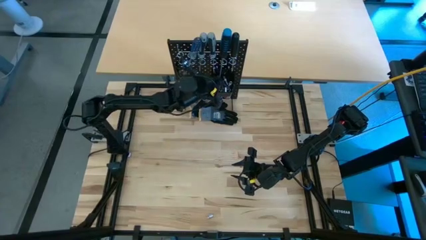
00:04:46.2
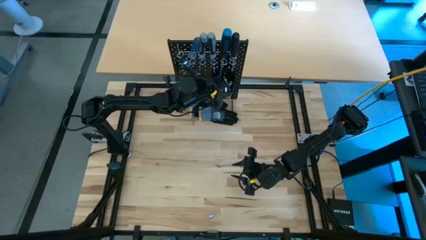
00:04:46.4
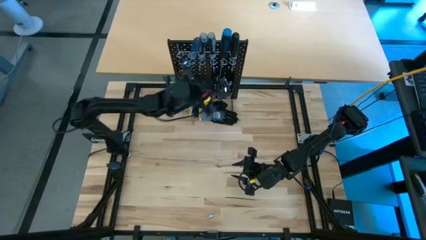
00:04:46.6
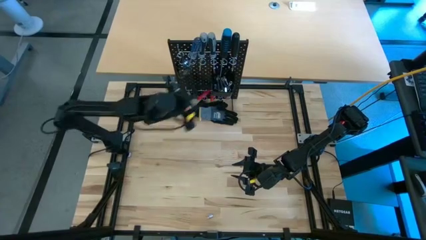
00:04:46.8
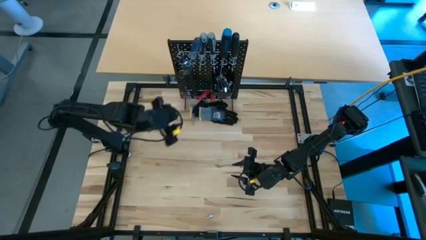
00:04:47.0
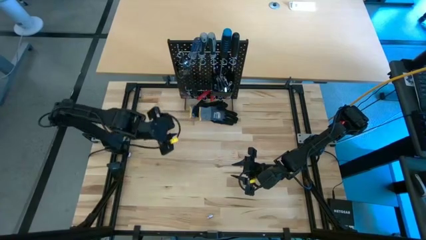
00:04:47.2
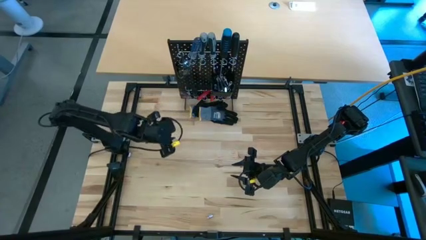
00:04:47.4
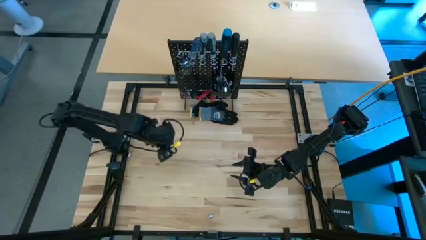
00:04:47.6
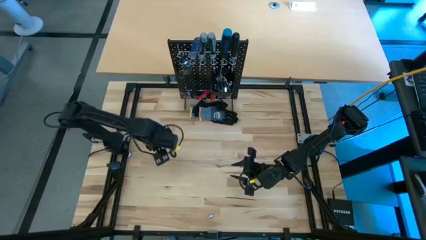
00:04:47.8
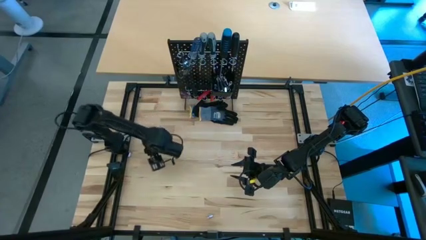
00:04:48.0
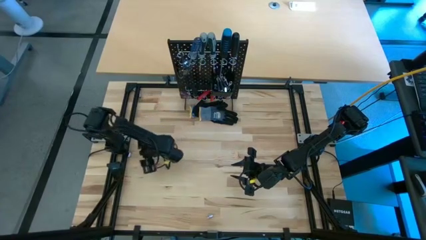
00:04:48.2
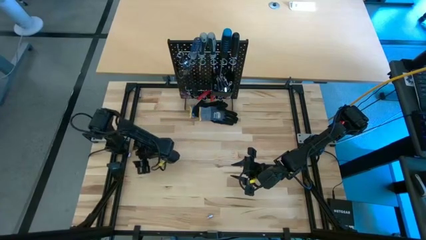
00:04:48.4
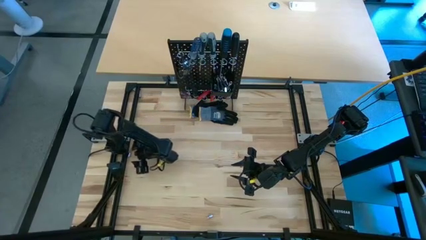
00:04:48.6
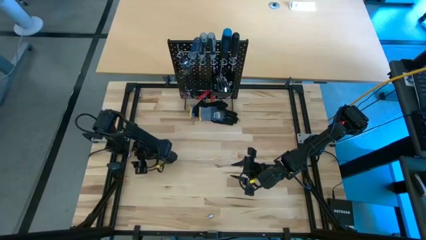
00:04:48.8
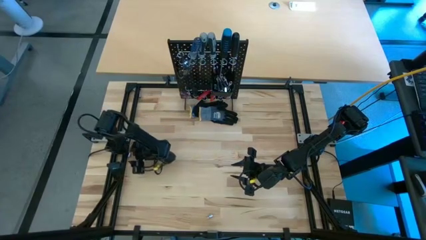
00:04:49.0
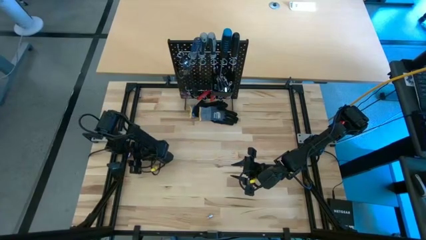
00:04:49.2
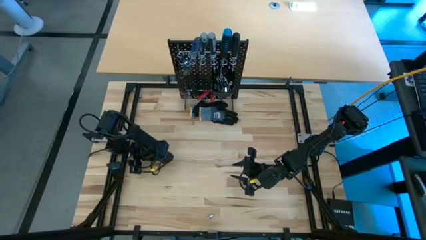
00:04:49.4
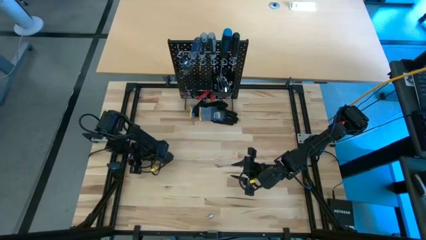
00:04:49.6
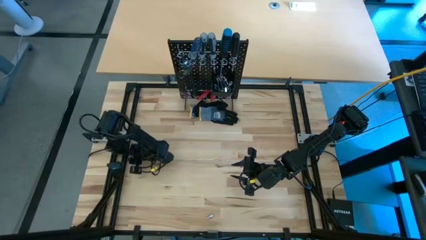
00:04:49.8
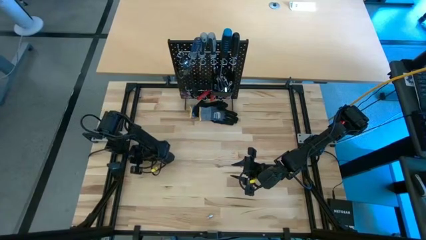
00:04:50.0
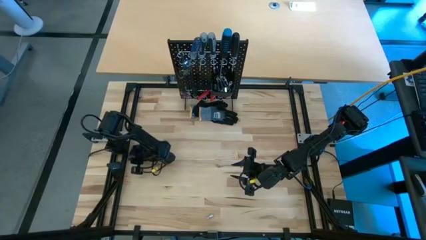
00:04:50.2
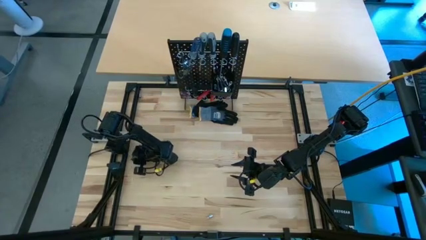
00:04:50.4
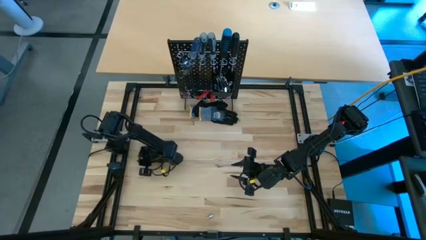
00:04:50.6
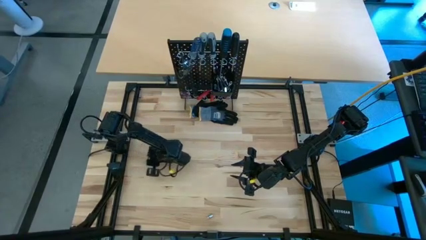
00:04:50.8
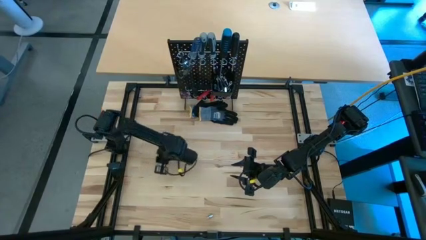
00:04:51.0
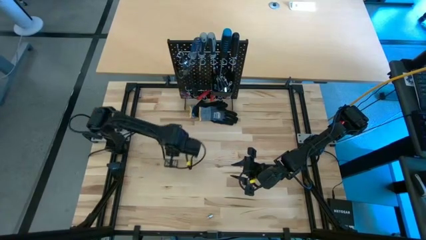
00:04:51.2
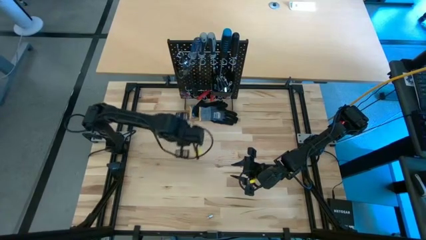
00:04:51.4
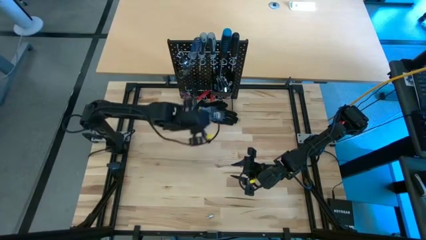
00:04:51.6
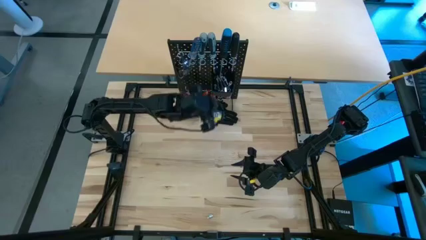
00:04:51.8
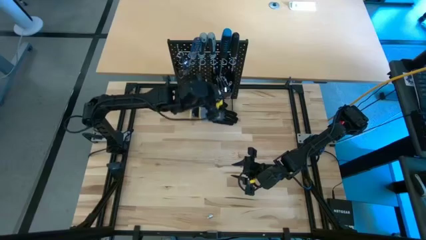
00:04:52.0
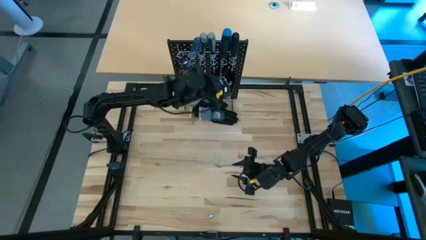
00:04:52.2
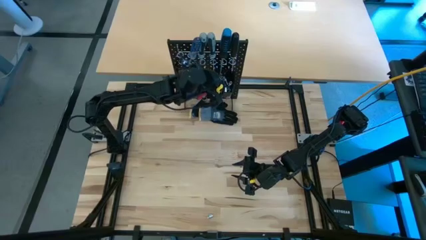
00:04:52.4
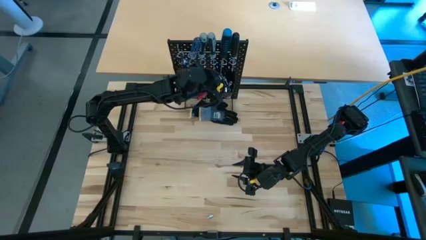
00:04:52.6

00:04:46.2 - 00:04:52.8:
Task: Hang tools onto peg board
Put the socket into the pegboard bin

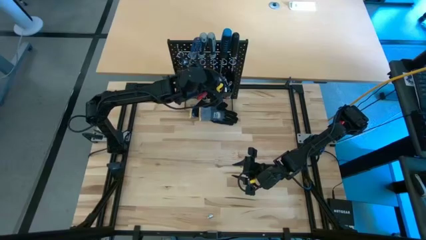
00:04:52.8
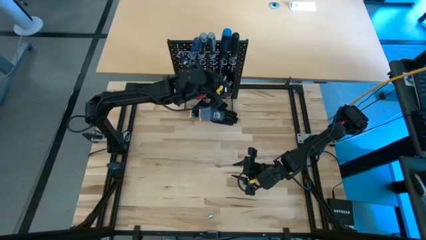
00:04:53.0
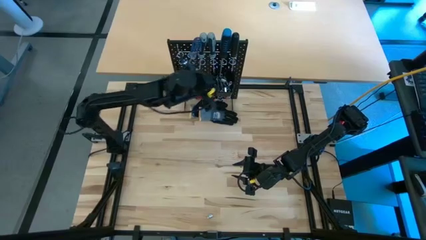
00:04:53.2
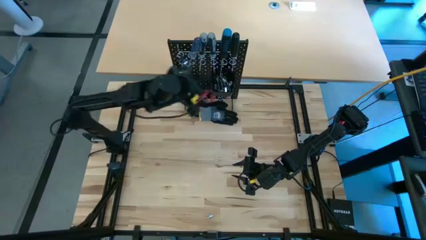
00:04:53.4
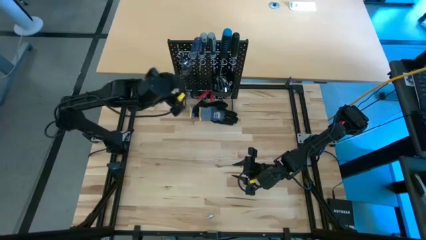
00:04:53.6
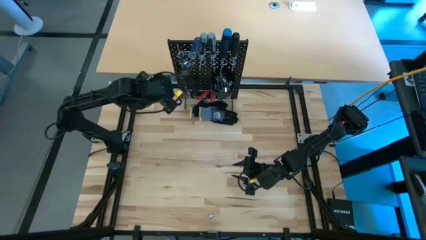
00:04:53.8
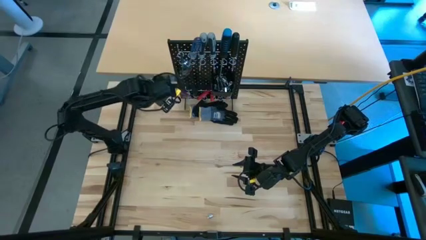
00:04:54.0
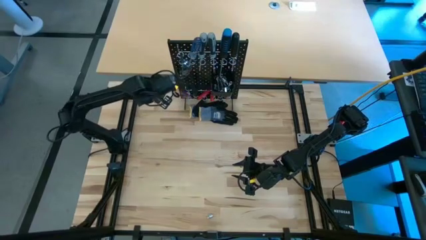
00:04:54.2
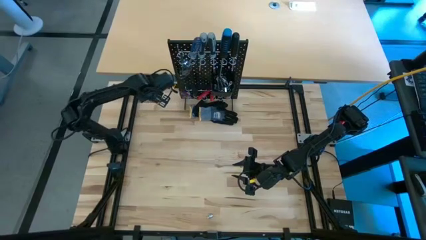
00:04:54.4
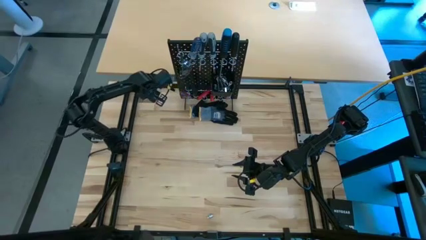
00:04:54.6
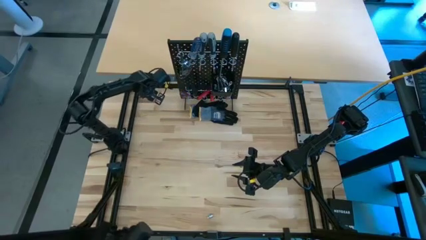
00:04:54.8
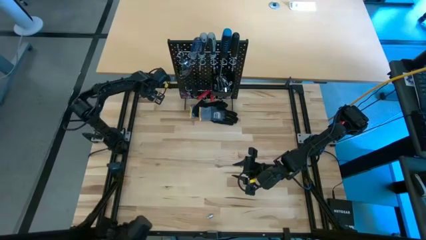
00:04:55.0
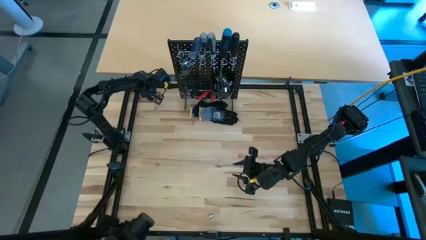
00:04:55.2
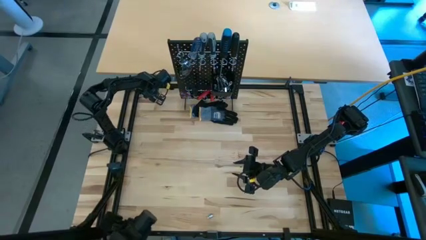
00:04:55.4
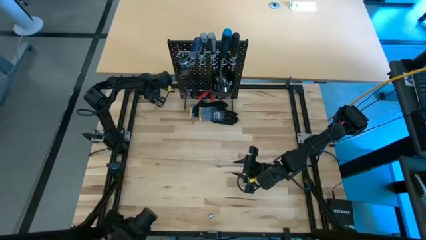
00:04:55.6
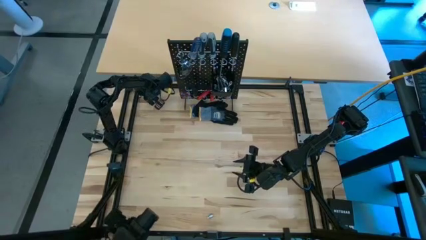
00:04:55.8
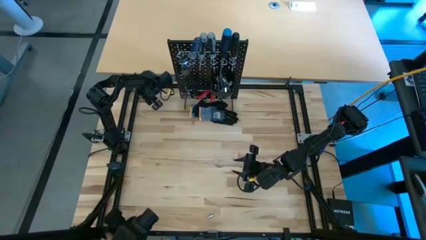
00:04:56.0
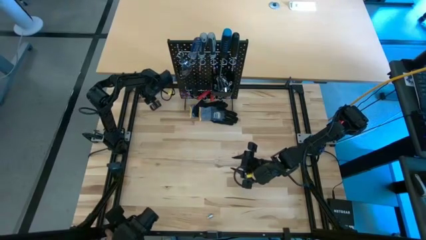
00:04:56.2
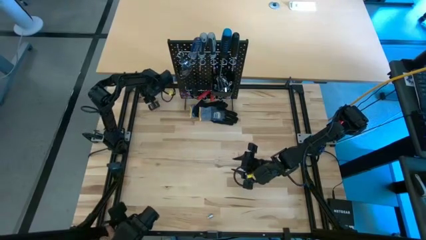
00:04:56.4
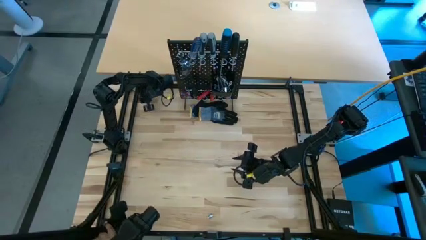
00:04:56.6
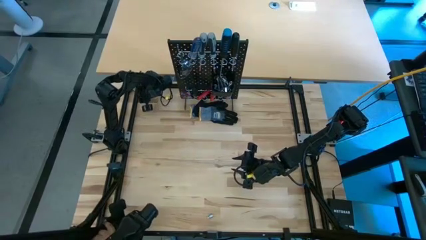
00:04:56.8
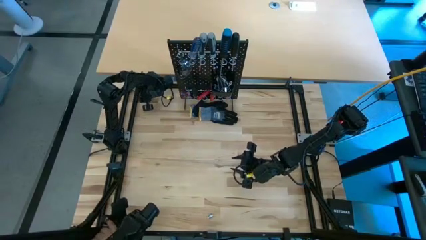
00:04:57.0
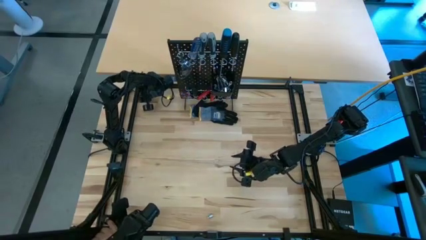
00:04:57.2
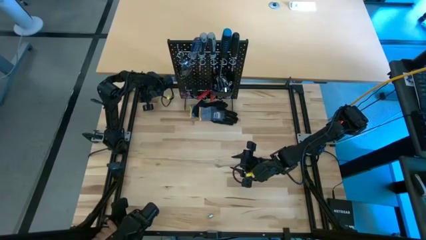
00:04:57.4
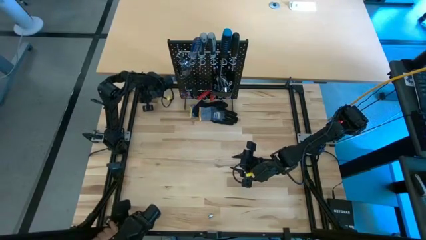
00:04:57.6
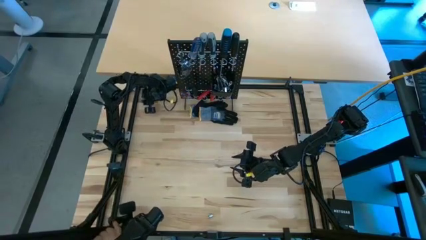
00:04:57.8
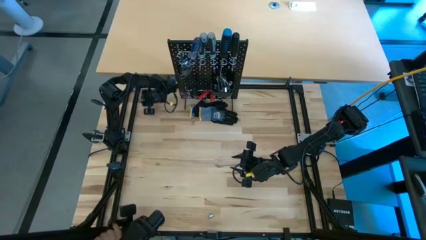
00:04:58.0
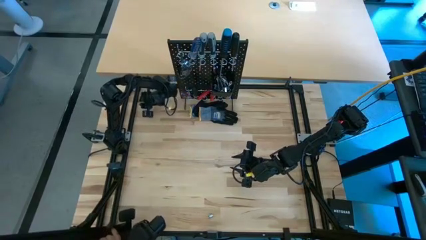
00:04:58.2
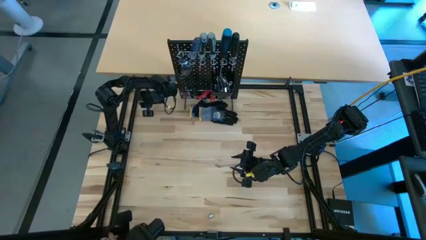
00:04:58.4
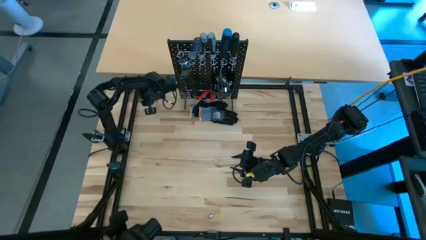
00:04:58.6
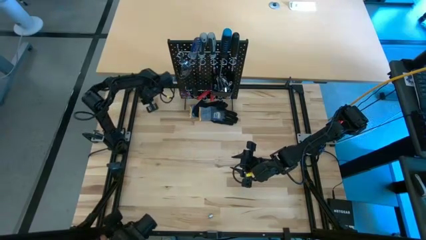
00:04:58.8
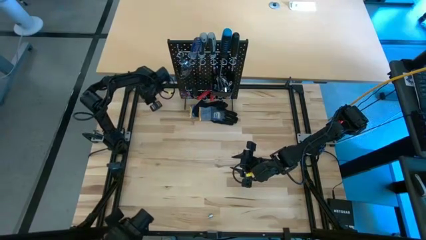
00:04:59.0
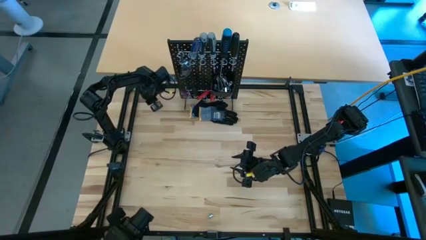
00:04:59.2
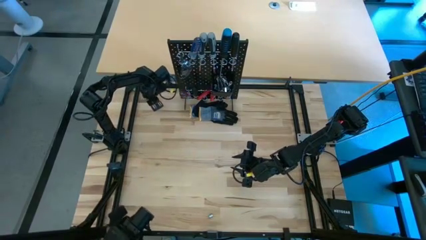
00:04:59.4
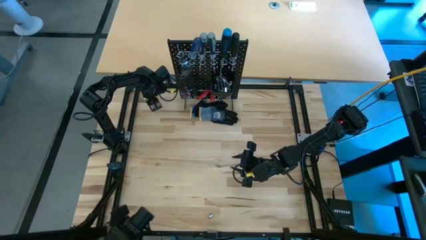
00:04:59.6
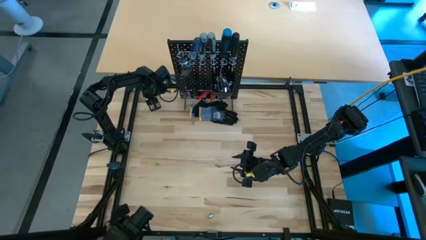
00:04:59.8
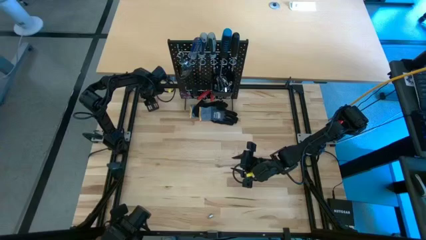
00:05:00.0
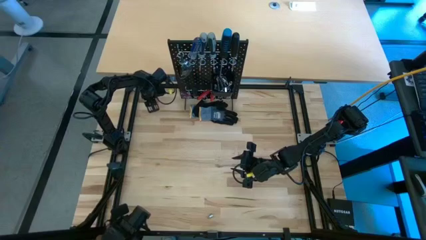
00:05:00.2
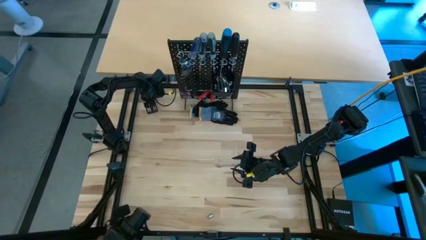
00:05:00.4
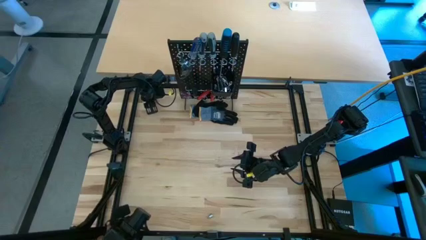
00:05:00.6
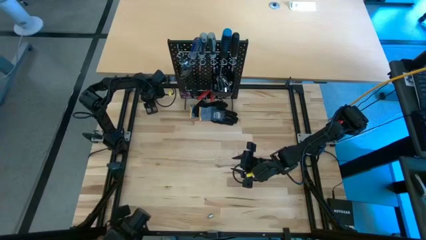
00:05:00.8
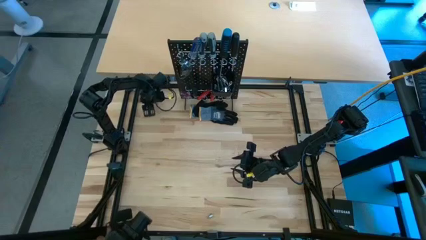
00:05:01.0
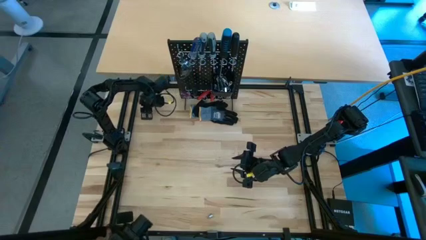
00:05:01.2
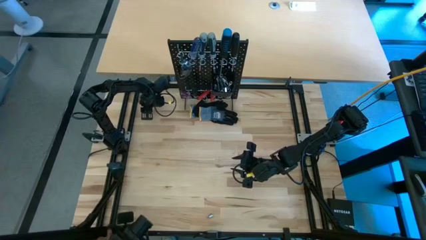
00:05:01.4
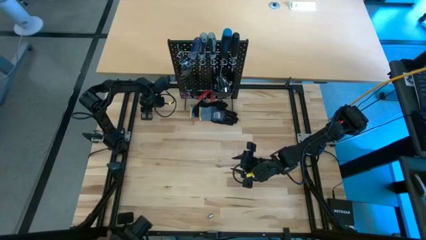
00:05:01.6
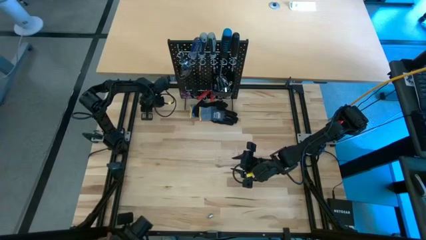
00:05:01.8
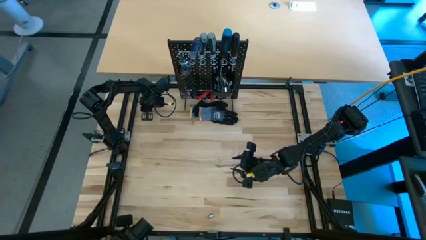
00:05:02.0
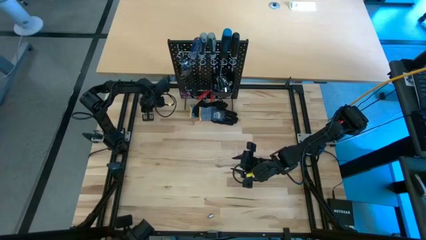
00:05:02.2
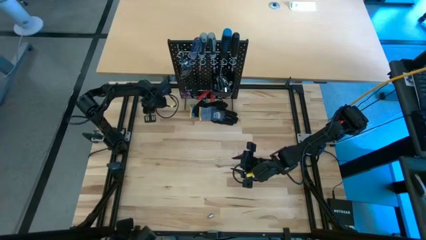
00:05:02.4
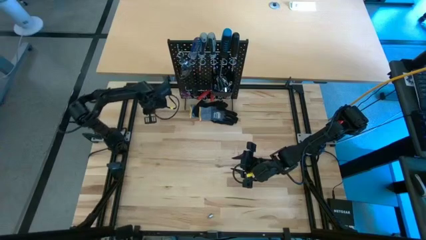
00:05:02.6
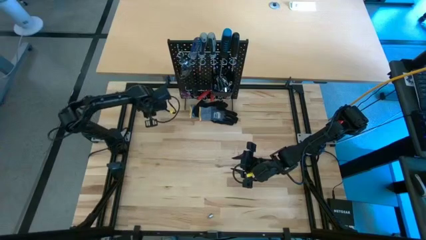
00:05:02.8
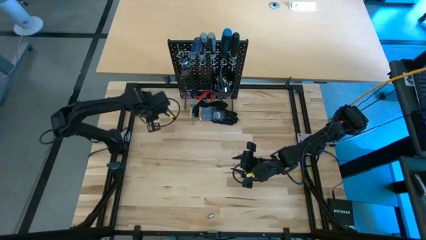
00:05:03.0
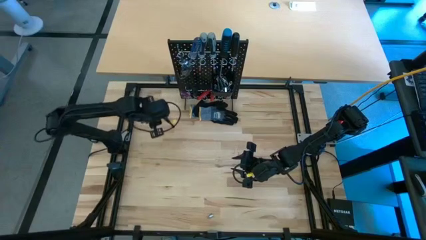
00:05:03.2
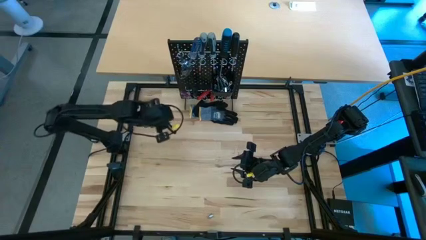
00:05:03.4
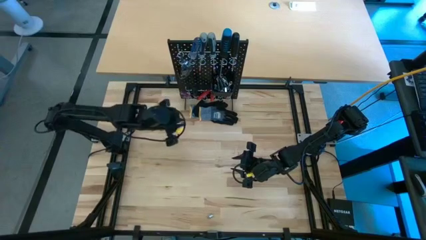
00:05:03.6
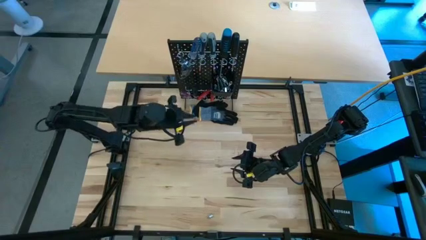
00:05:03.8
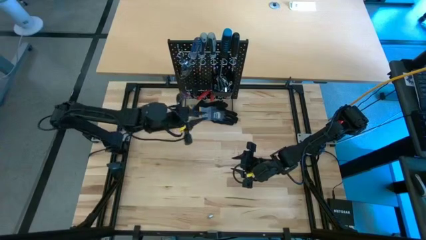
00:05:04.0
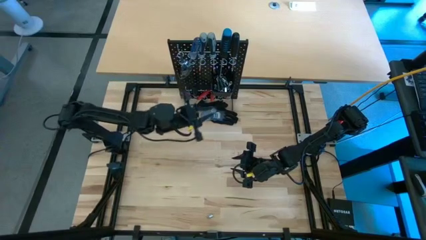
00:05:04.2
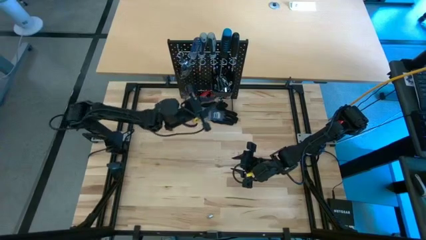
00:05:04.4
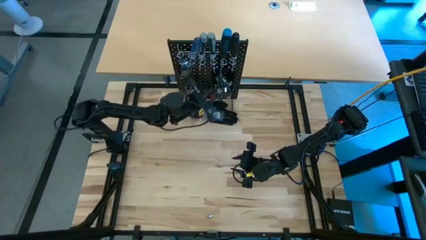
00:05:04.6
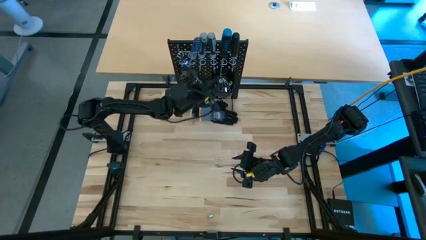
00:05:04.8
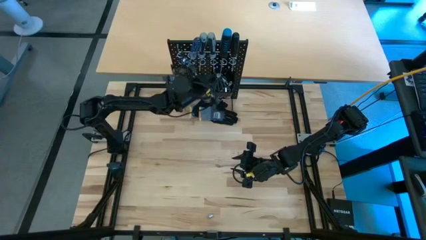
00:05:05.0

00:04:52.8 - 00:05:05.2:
Put the socket into the pegboard bin
